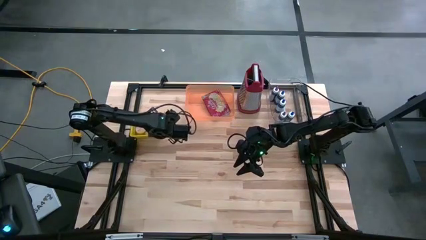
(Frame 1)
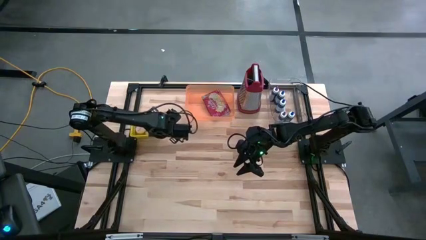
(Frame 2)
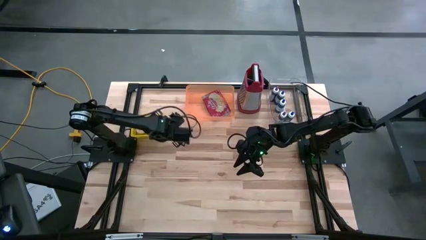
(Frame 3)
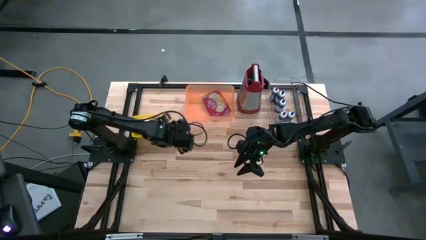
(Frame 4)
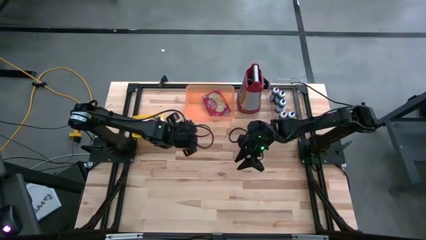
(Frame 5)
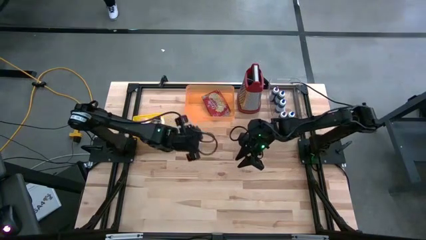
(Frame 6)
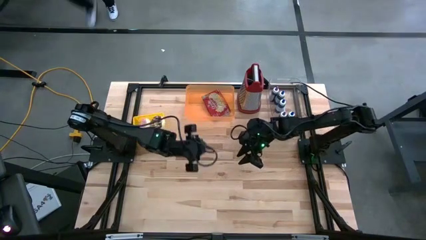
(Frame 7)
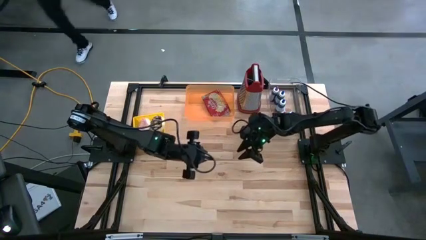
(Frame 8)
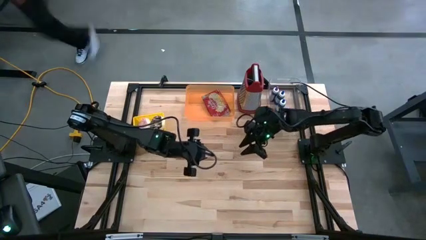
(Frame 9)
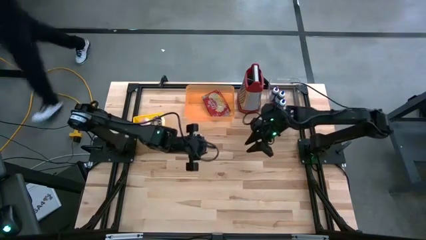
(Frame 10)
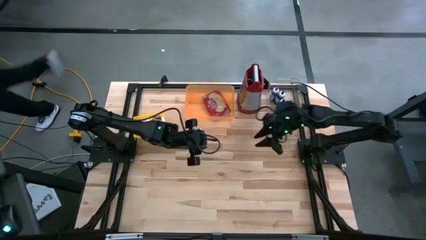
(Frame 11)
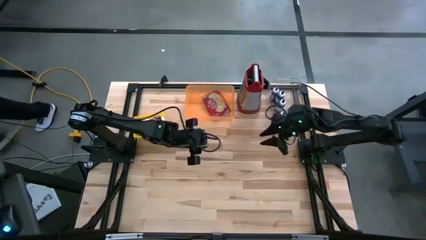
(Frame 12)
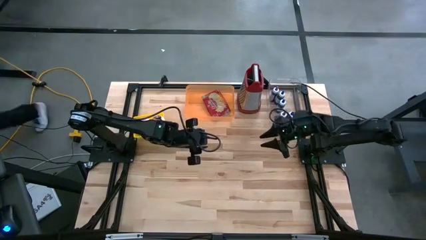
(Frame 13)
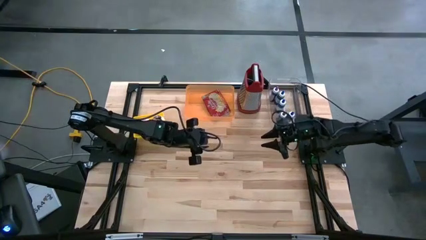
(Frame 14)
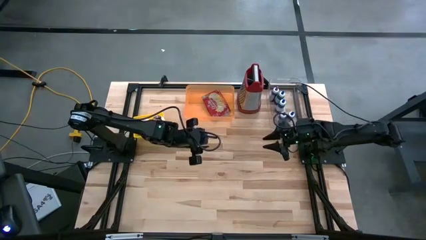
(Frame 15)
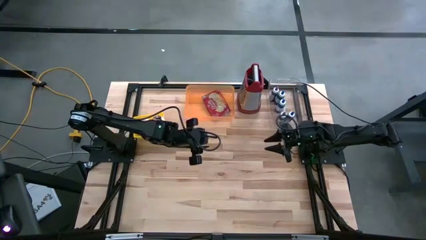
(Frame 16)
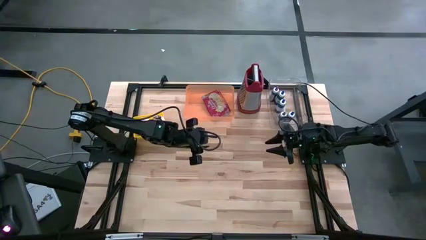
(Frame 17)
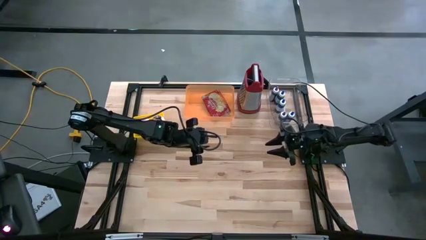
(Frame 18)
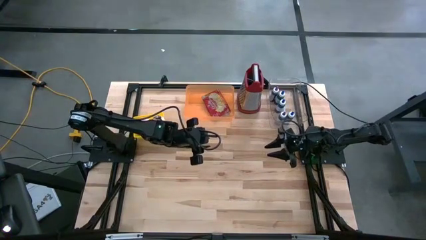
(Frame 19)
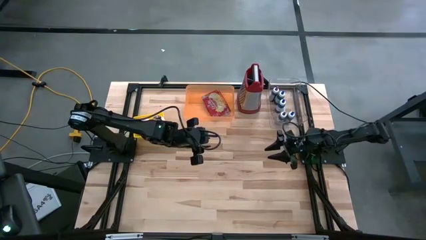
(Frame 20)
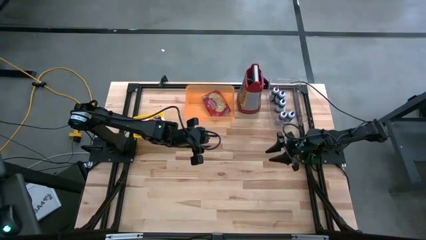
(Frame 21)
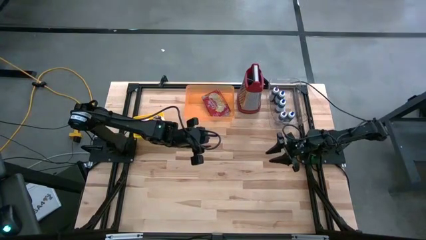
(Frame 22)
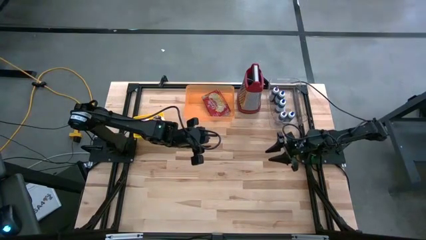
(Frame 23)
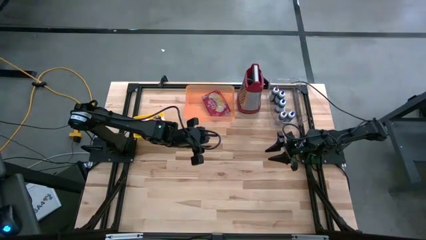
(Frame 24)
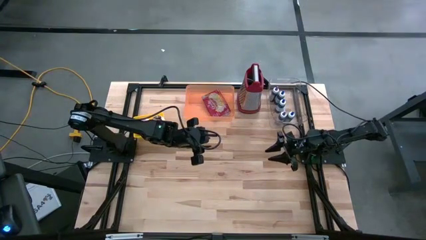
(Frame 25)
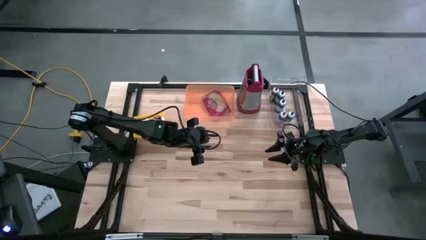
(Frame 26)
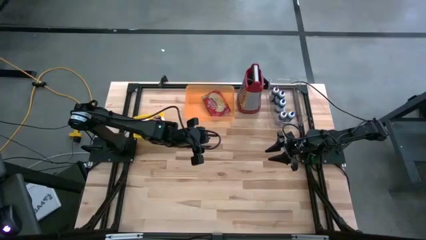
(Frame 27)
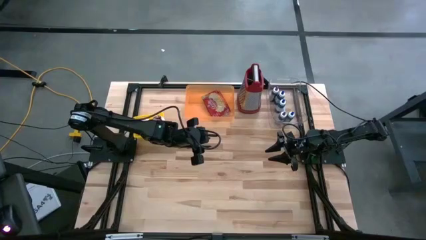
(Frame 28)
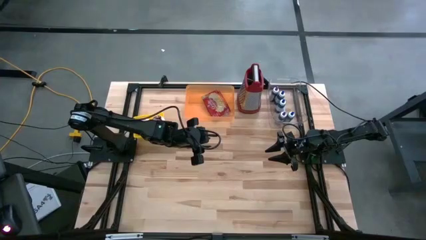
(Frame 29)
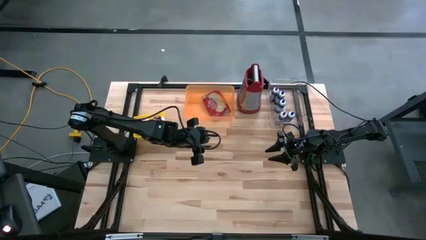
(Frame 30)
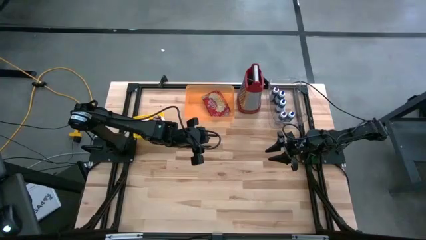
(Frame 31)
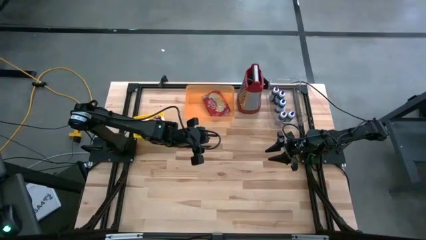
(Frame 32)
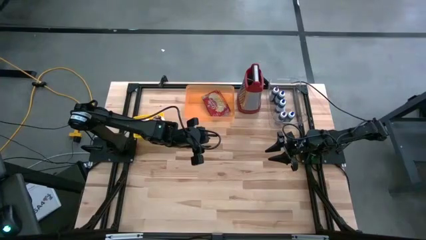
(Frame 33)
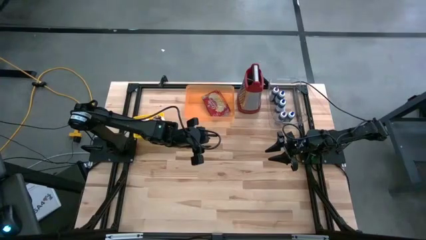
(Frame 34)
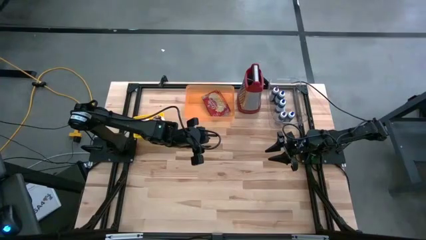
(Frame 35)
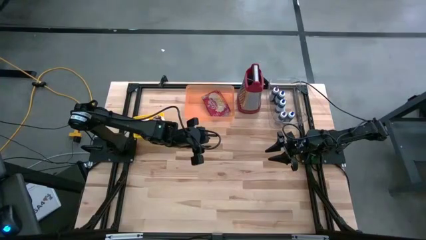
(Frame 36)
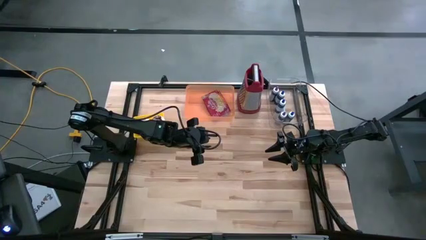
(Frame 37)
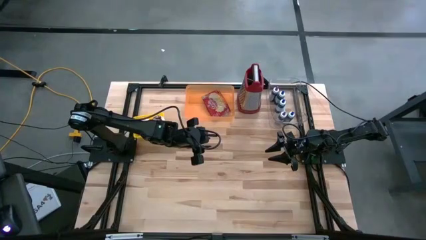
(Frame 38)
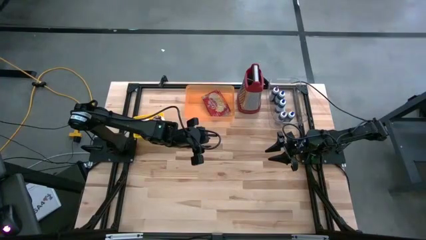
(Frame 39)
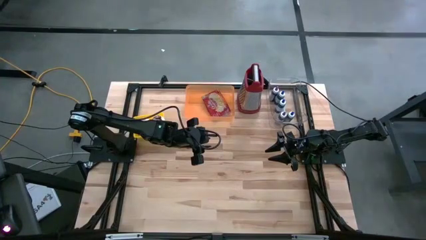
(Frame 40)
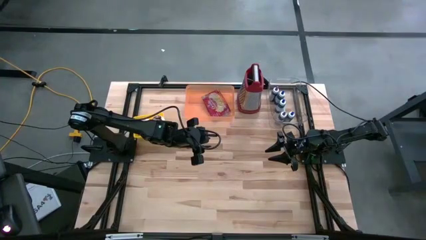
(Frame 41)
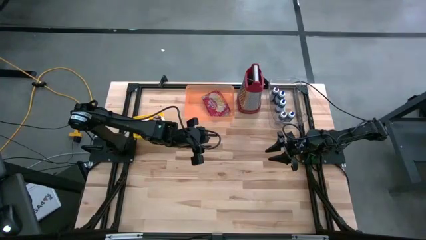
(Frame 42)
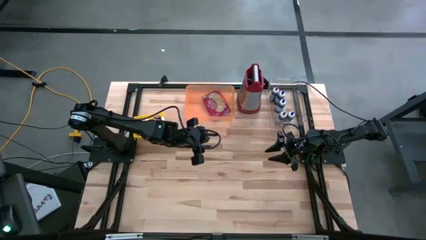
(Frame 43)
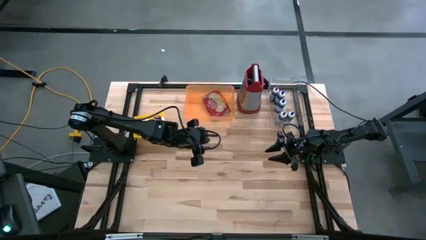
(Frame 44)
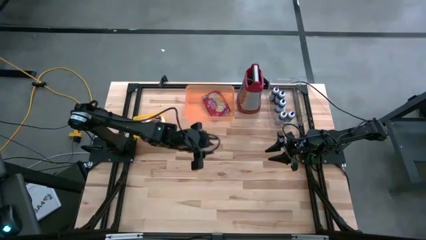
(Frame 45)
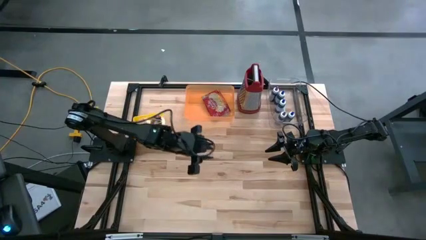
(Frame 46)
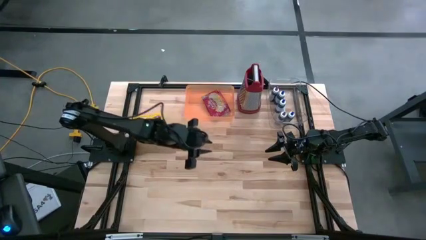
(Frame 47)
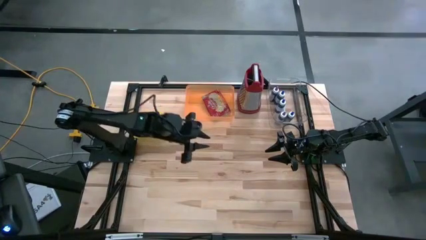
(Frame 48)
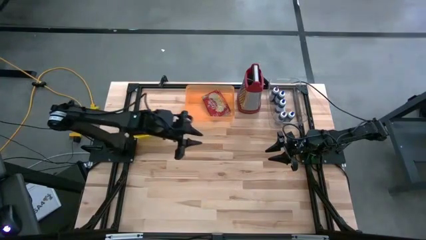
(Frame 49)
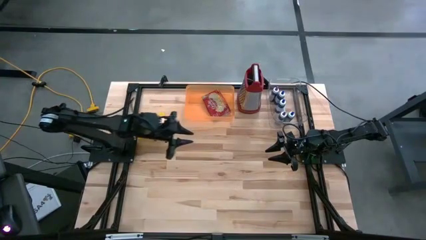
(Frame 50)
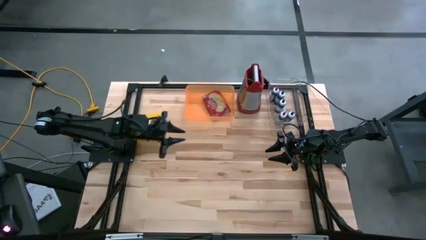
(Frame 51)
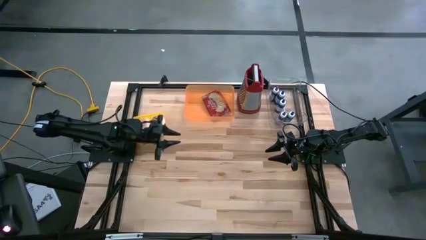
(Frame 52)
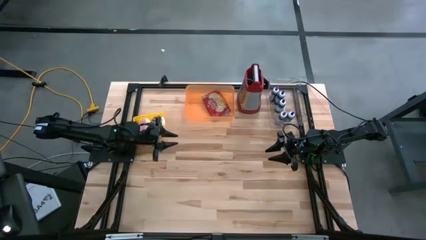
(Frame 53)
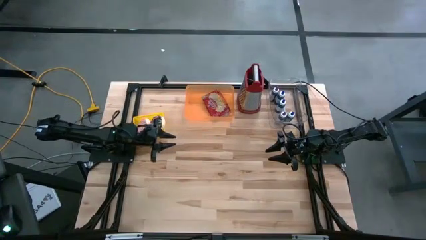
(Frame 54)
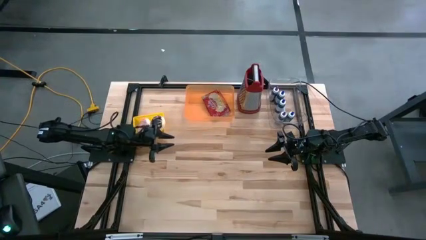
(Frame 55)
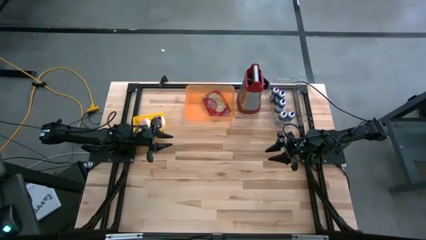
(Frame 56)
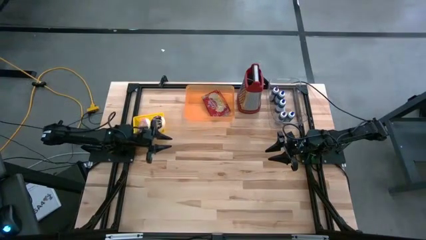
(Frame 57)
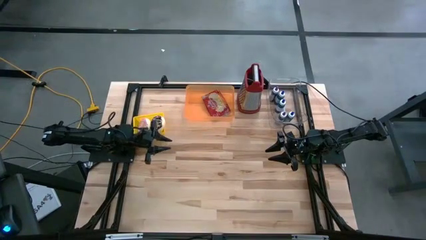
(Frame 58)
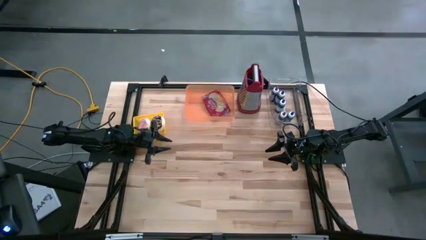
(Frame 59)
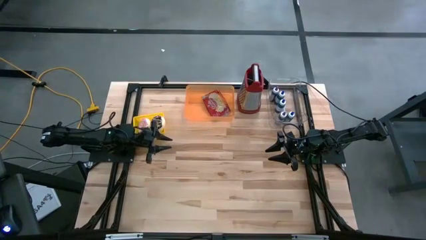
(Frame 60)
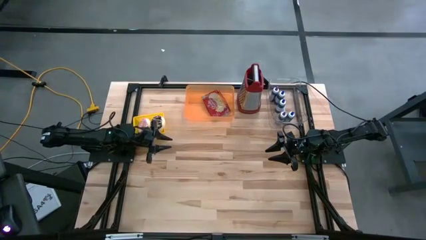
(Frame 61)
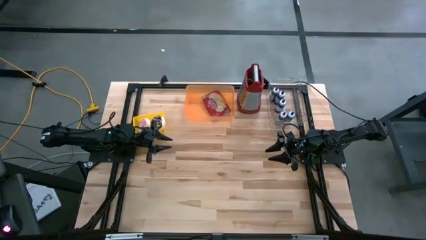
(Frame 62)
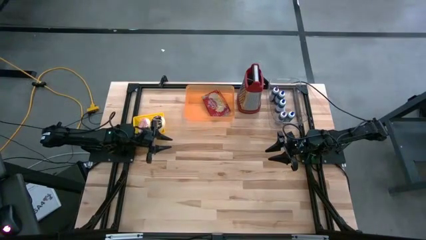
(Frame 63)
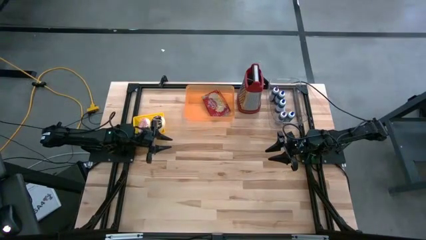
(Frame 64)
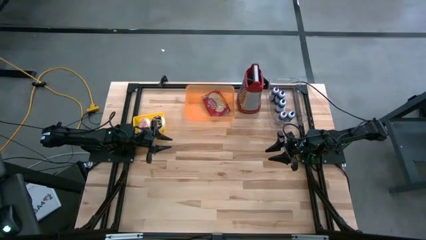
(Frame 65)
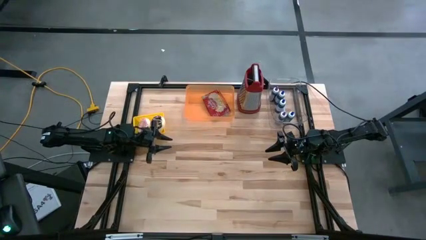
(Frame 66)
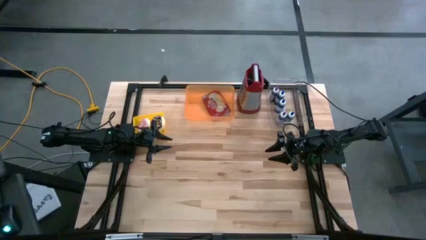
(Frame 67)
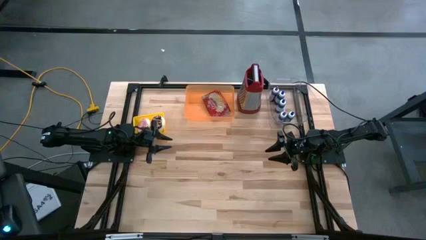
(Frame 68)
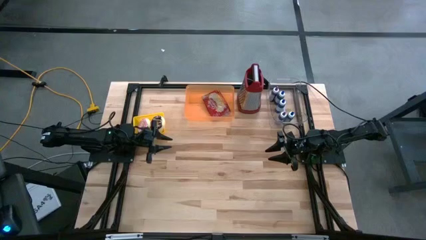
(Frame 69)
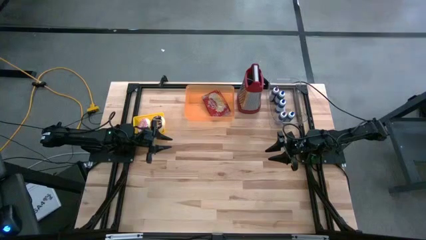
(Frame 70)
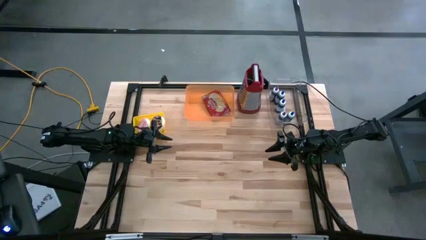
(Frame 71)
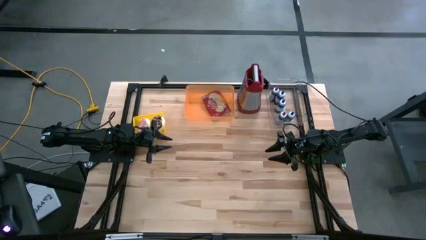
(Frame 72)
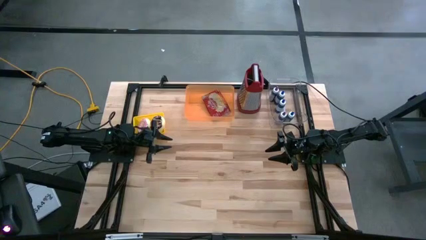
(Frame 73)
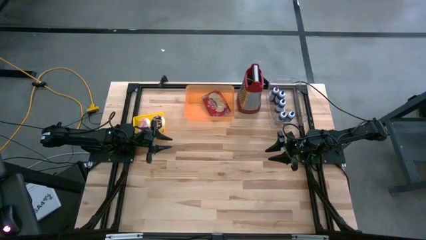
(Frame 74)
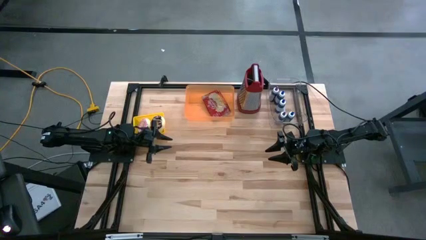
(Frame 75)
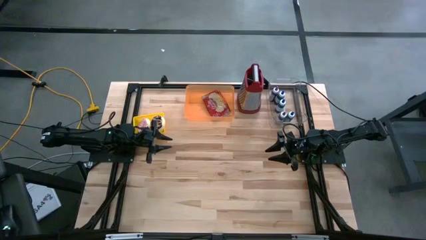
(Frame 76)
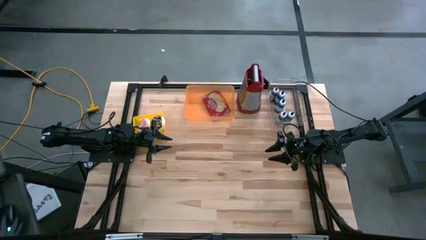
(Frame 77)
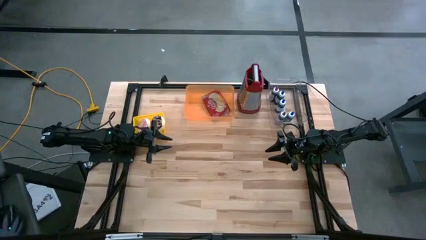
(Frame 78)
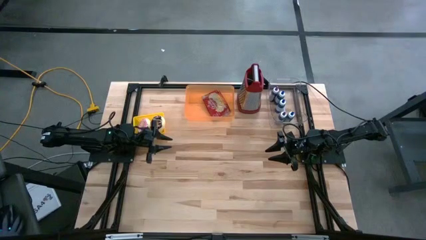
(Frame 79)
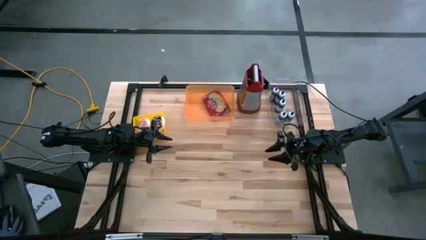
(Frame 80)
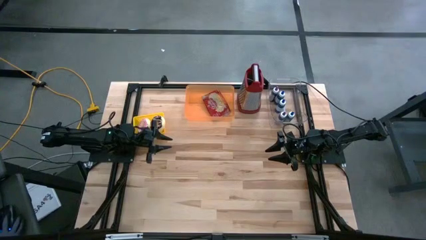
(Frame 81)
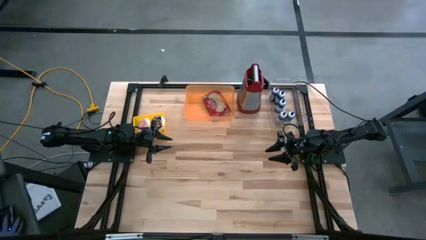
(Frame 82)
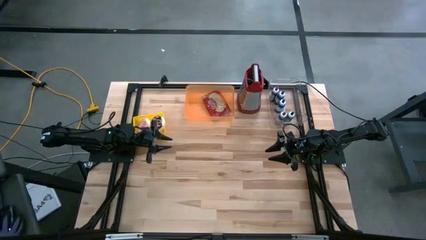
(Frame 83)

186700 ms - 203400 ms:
Task: Pick & Place Food Item
Return to Home Position
